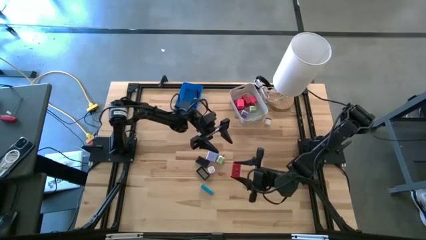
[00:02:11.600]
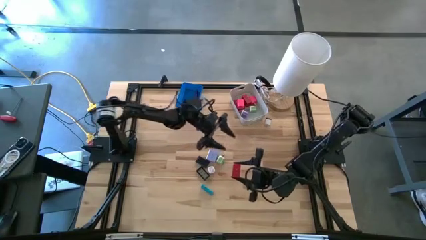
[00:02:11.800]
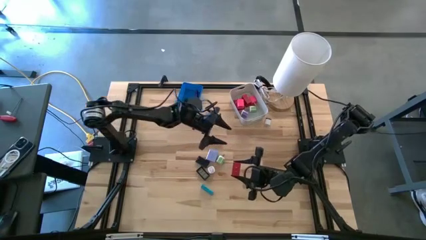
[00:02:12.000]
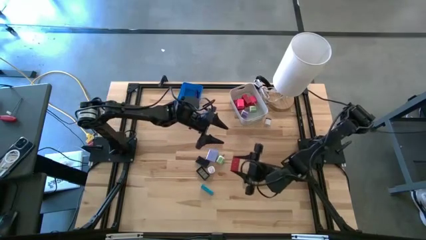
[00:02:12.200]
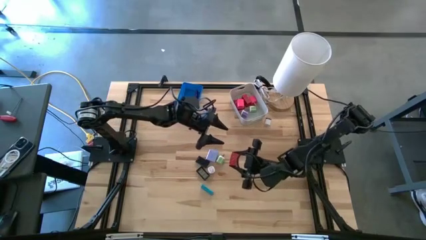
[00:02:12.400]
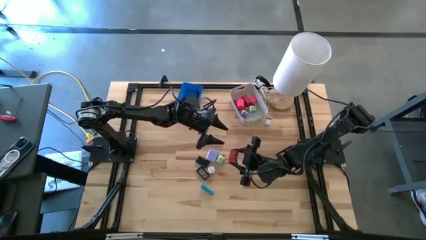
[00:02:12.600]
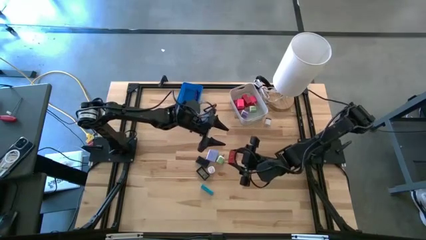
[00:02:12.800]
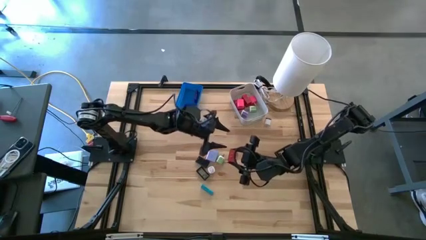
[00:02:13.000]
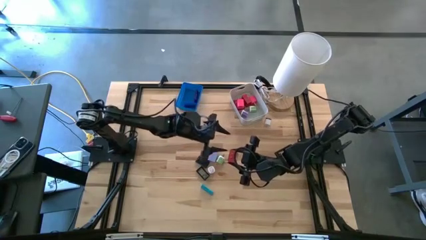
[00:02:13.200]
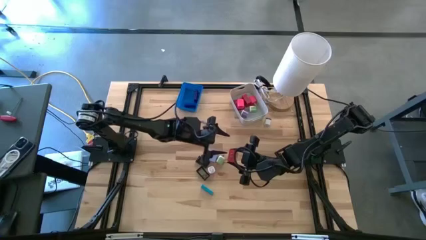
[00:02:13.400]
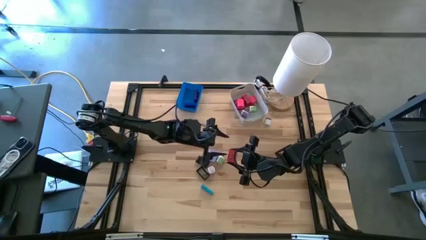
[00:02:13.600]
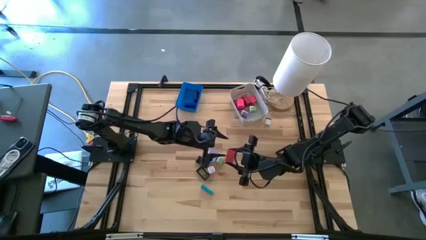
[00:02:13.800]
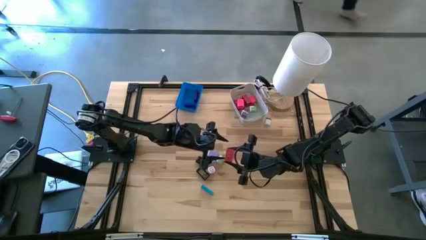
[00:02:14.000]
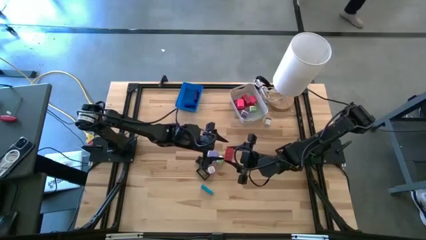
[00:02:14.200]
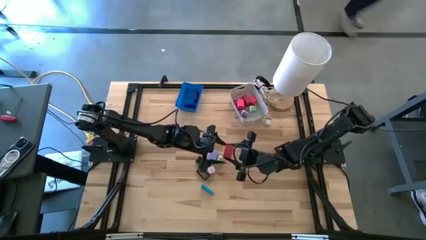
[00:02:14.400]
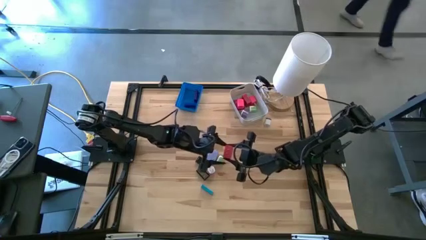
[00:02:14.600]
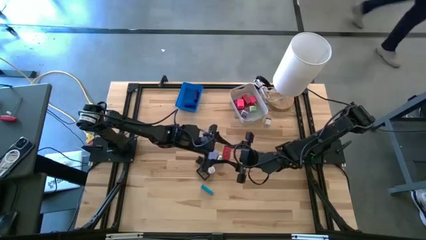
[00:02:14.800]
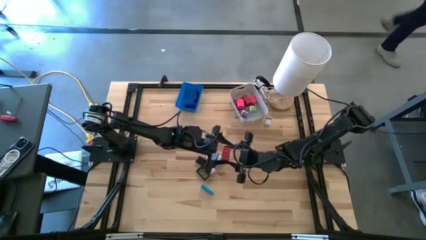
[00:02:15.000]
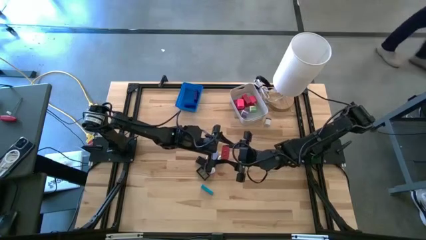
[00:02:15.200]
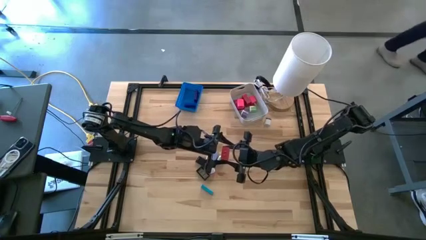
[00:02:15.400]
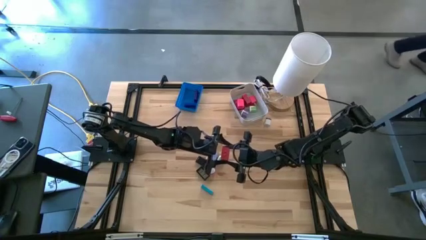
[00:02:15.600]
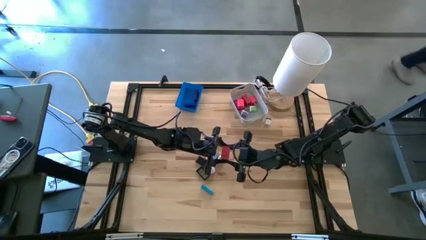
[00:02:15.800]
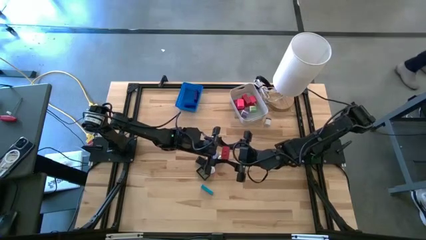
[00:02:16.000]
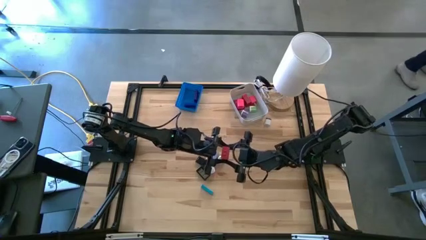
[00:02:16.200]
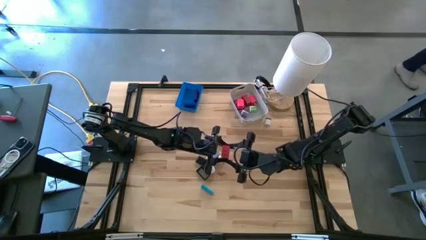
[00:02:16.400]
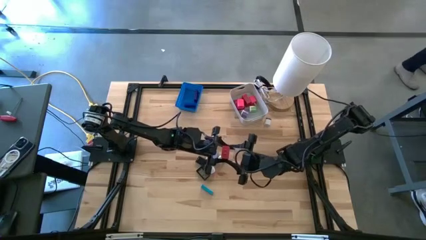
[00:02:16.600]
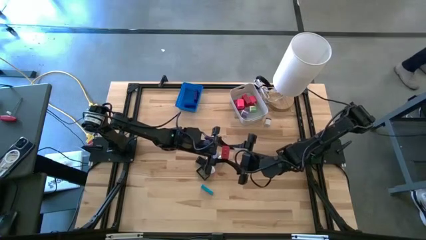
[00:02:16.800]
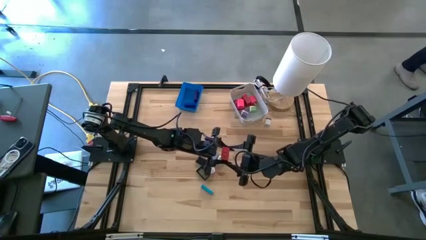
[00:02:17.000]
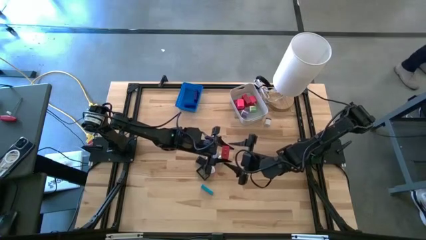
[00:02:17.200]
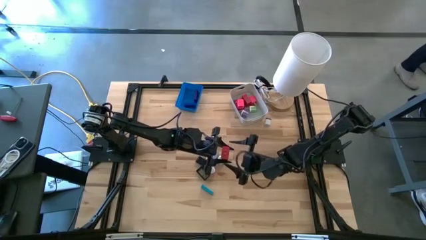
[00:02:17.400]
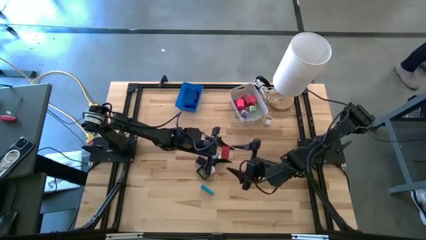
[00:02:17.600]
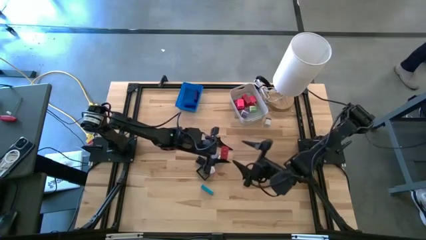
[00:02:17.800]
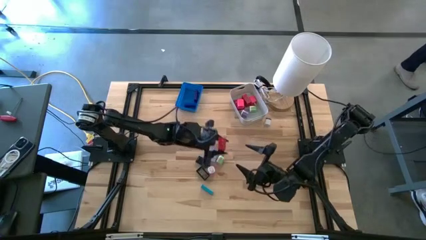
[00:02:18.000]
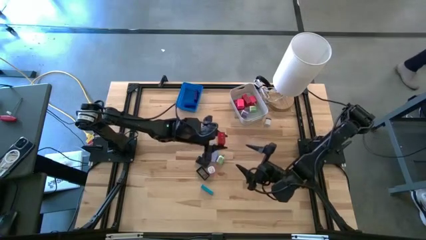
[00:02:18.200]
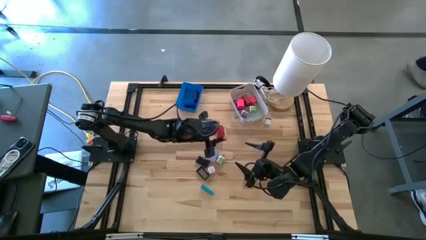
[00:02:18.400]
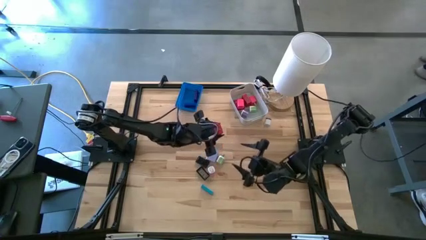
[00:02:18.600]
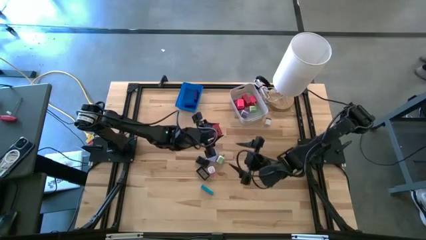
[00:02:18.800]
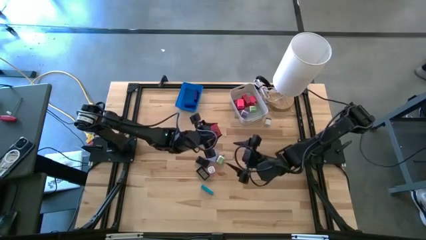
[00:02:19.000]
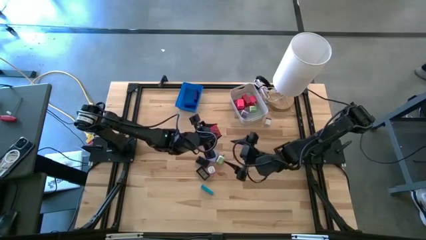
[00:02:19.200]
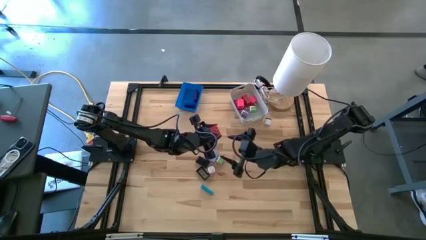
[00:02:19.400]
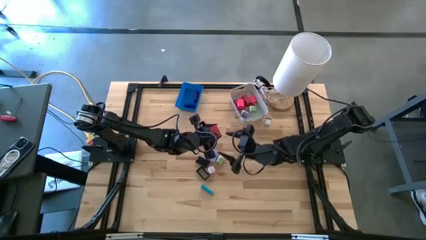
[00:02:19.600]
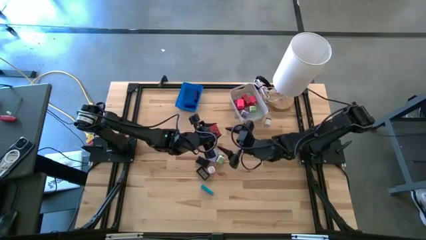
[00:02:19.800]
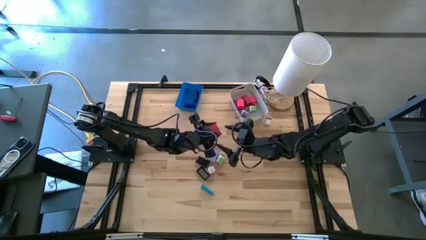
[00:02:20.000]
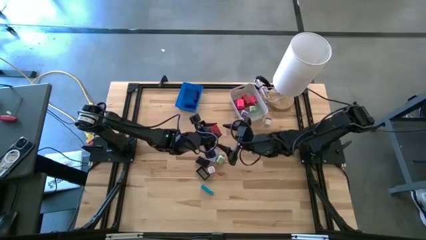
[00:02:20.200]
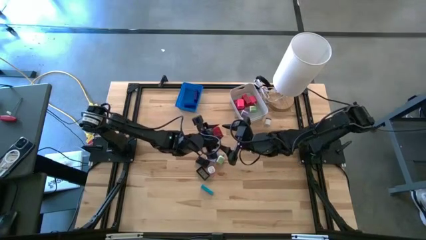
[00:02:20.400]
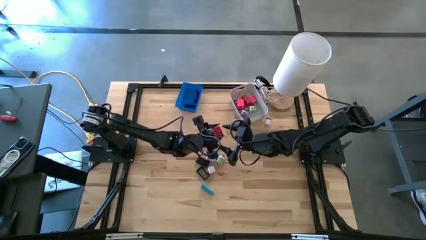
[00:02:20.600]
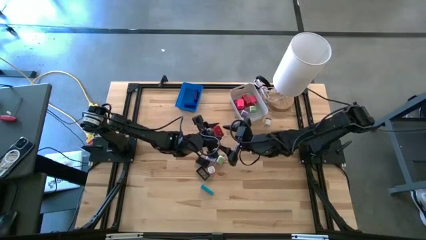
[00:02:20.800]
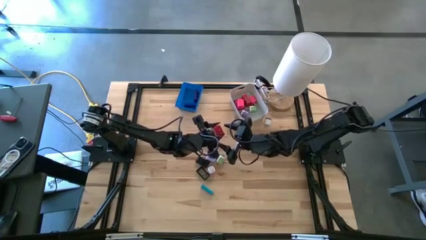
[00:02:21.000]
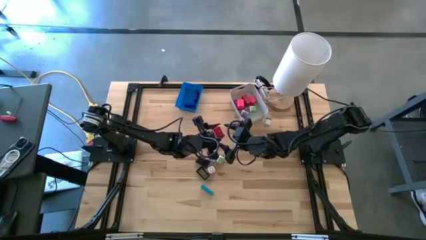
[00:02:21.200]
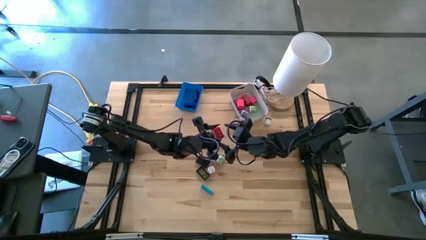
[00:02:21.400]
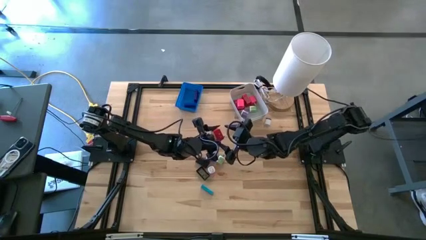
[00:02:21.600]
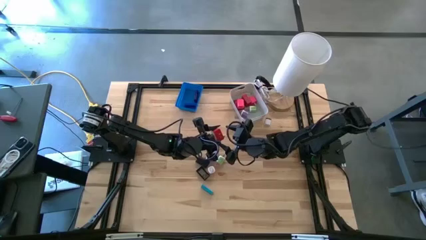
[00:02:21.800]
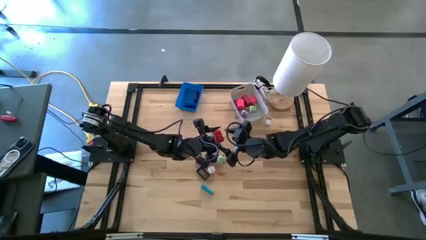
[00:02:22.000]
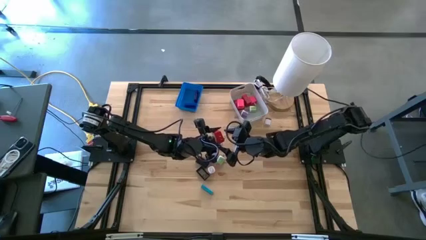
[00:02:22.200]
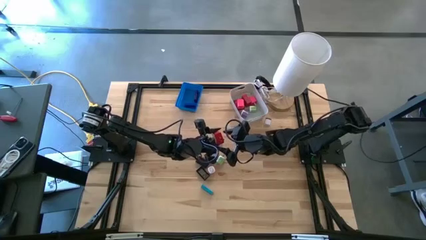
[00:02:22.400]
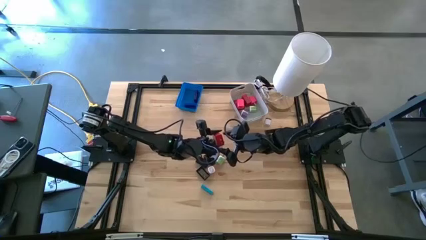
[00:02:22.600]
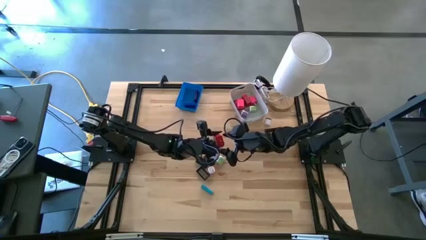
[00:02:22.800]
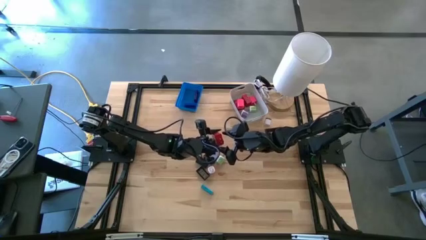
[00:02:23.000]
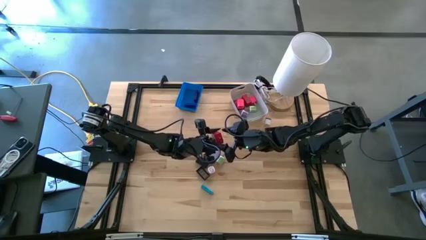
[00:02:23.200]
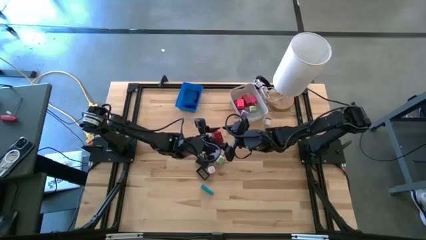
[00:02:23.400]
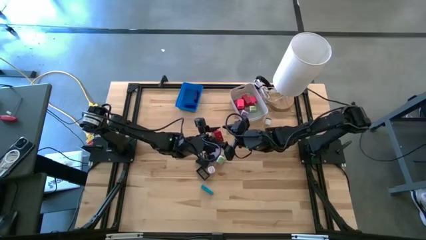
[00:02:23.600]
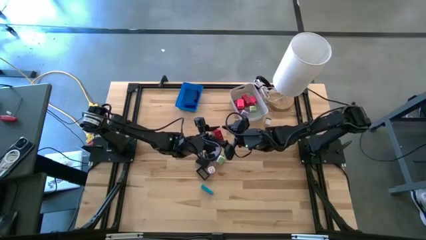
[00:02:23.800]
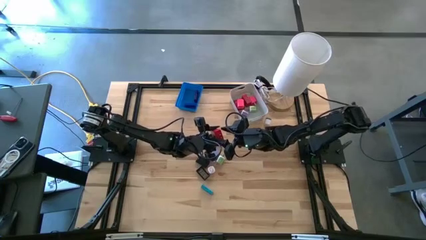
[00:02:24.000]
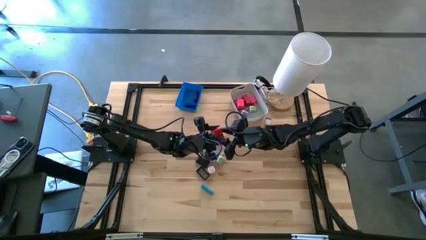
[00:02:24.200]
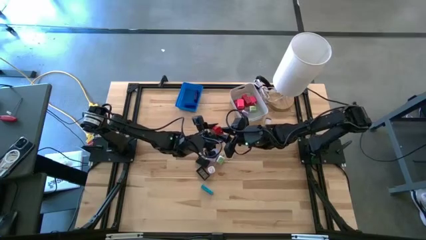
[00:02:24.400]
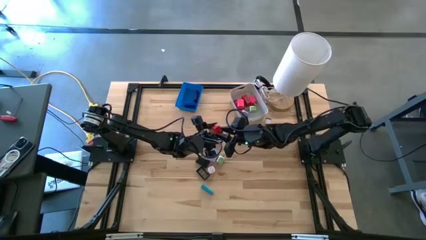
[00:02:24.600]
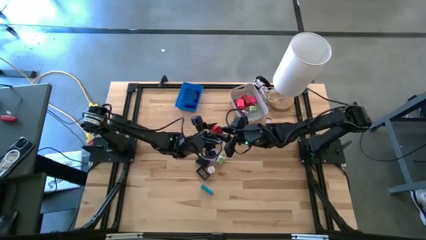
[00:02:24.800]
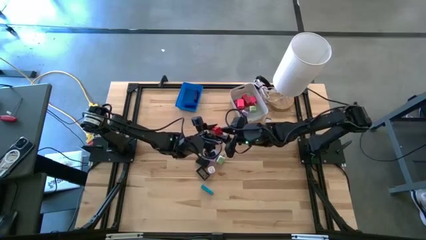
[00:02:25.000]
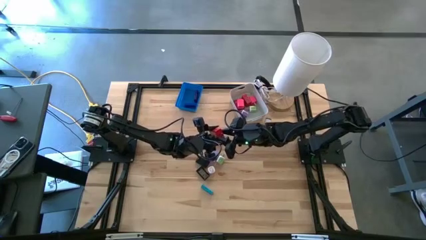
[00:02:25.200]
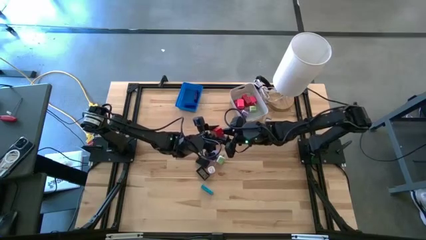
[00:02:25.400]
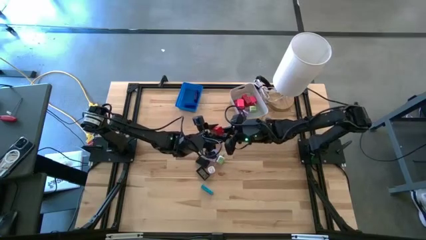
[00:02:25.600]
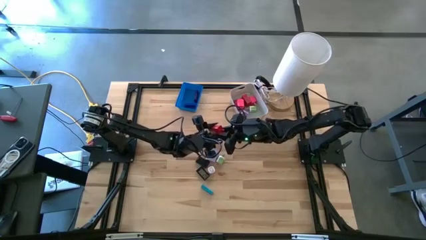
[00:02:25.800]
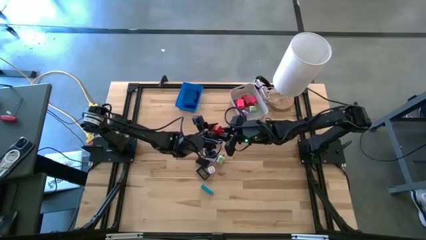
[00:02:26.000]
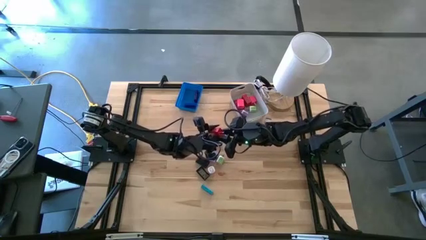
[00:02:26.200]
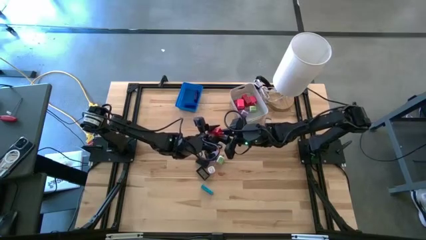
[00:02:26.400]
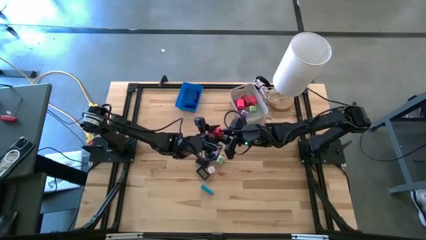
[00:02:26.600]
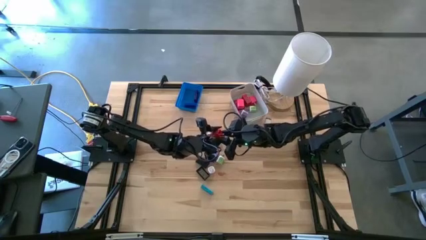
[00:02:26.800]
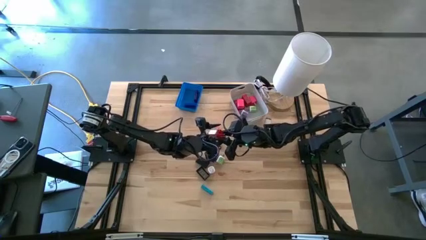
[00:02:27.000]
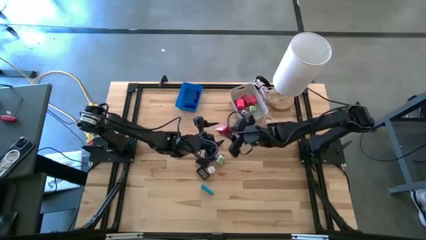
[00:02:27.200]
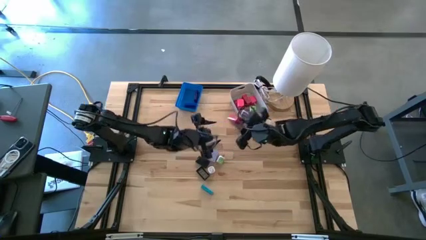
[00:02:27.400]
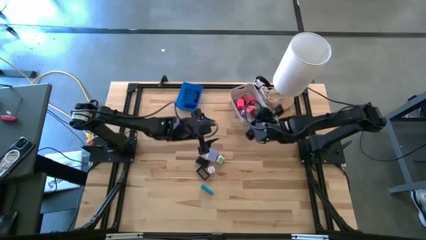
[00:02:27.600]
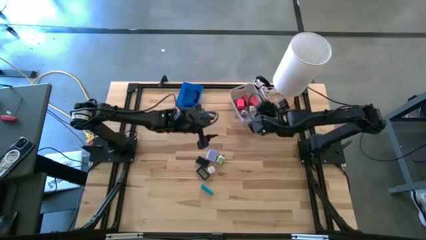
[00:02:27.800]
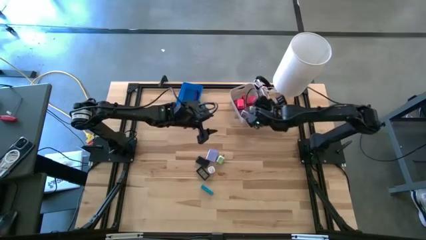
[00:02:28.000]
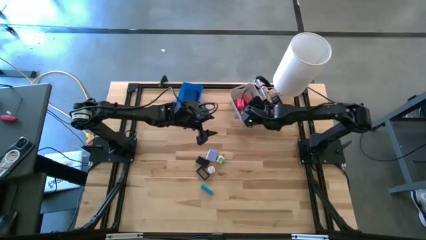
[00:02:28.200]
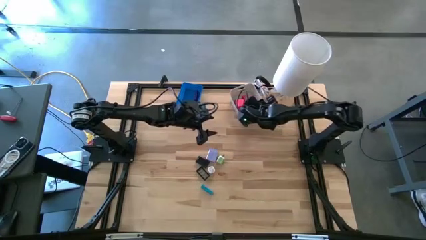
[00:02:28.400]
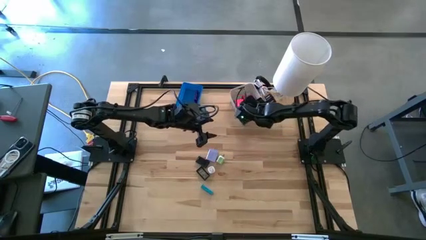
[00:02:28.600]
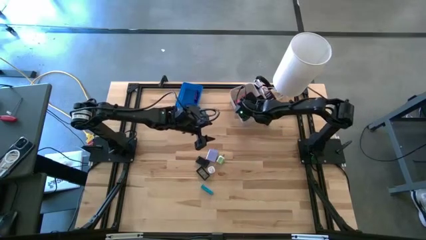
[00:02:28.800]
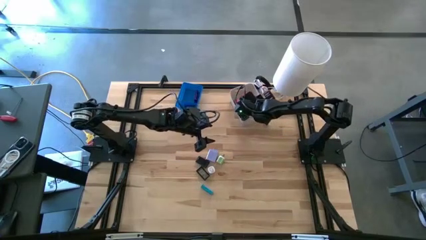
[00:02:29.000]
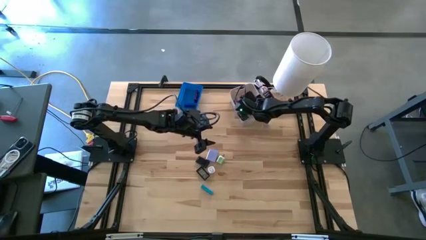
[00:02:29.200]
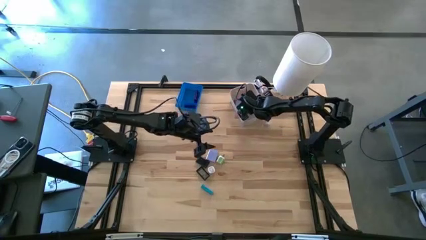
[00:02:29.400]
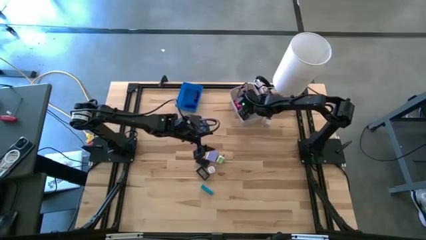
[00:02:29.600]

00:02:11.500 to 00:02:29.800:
Task: Pick & Place Office items
Put the red charger adapter into the white bin
